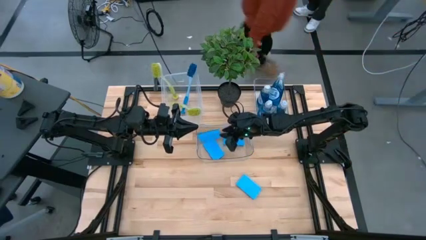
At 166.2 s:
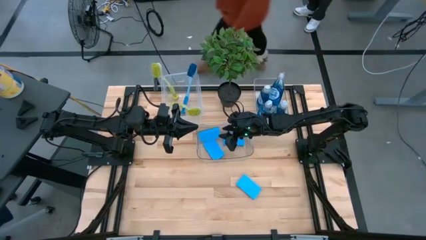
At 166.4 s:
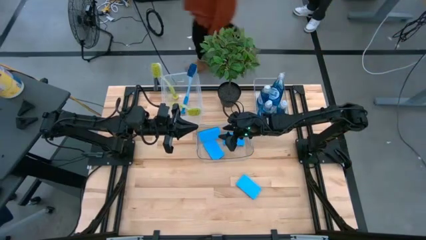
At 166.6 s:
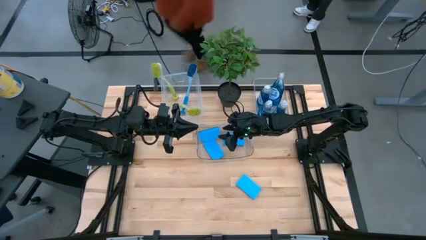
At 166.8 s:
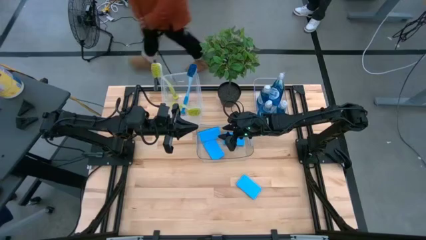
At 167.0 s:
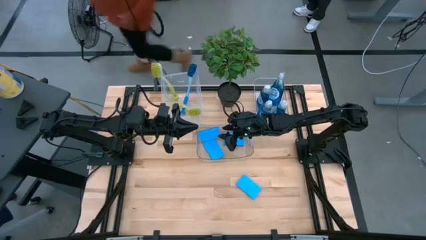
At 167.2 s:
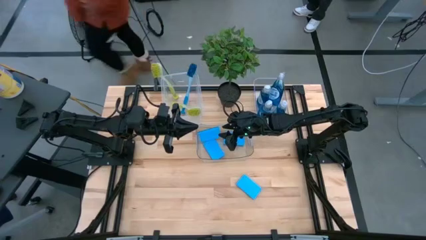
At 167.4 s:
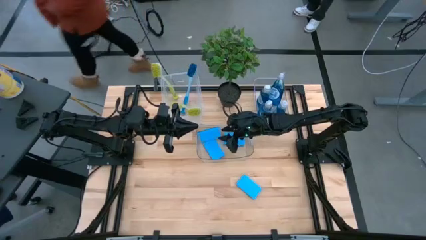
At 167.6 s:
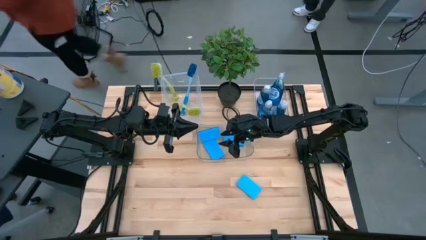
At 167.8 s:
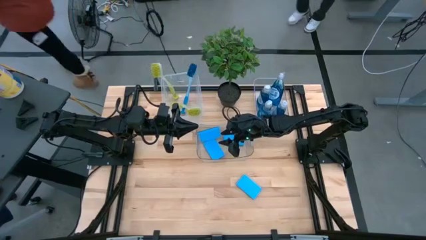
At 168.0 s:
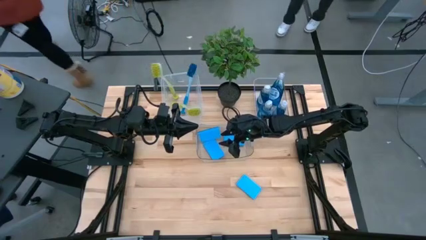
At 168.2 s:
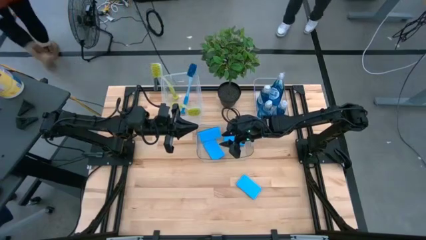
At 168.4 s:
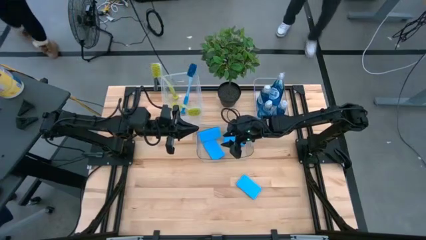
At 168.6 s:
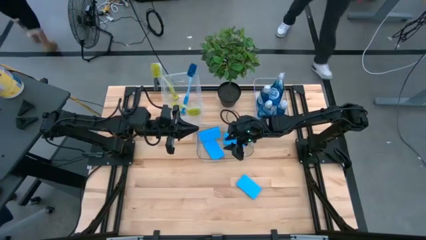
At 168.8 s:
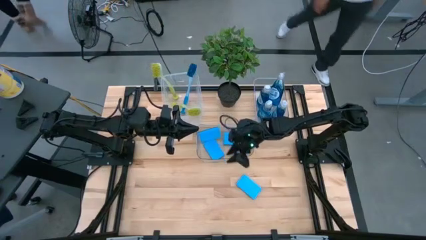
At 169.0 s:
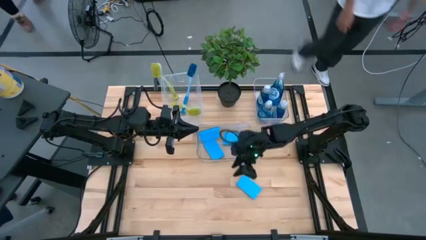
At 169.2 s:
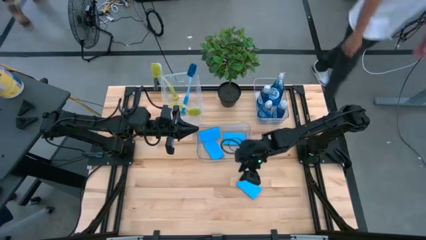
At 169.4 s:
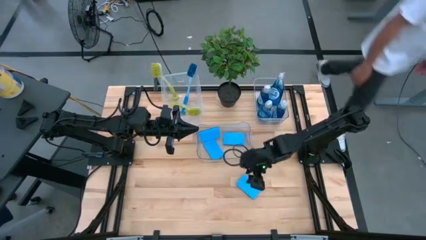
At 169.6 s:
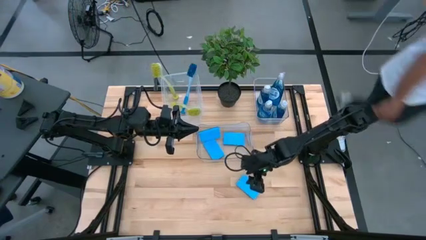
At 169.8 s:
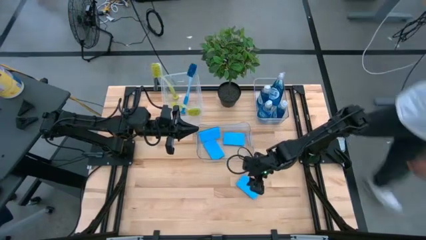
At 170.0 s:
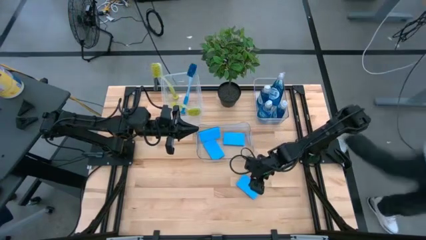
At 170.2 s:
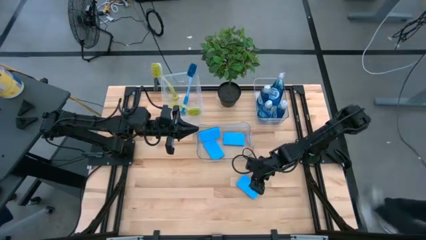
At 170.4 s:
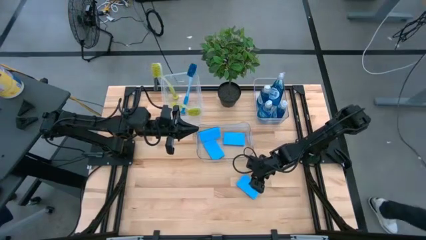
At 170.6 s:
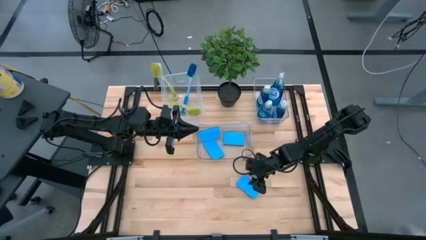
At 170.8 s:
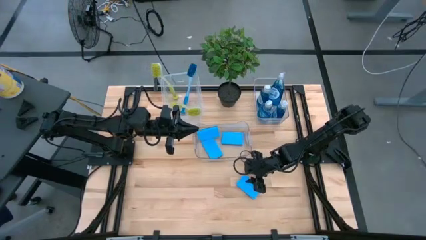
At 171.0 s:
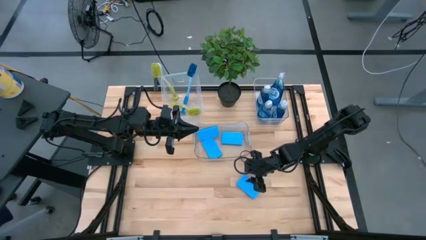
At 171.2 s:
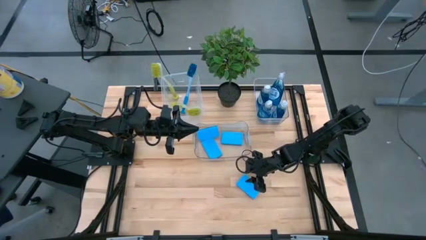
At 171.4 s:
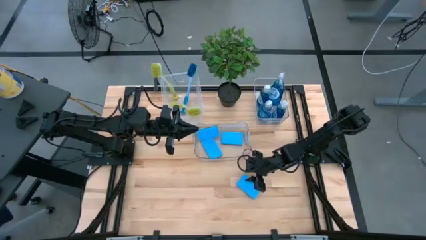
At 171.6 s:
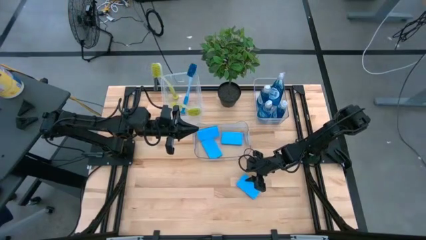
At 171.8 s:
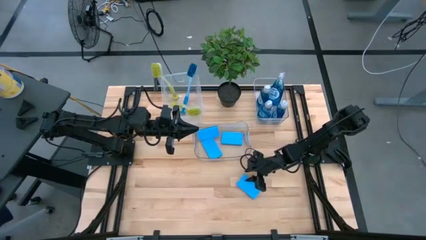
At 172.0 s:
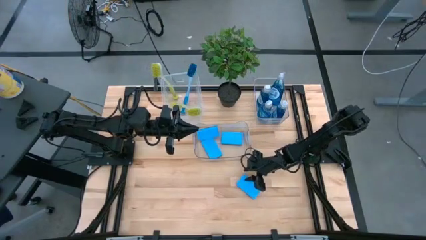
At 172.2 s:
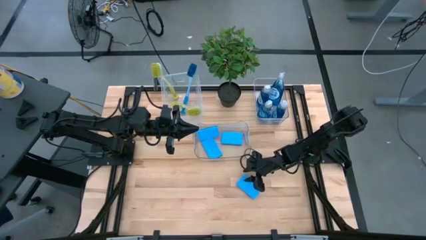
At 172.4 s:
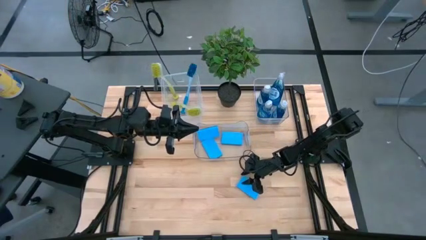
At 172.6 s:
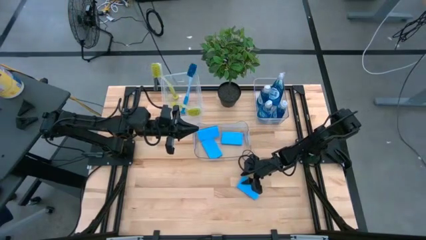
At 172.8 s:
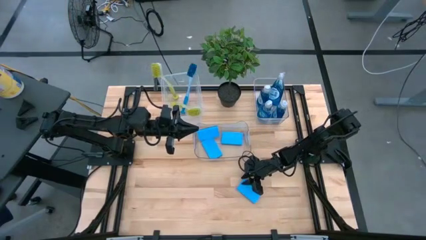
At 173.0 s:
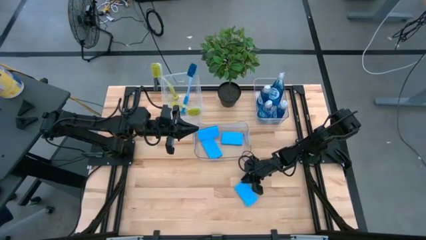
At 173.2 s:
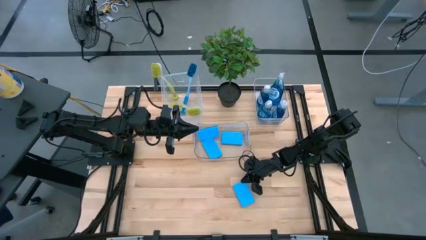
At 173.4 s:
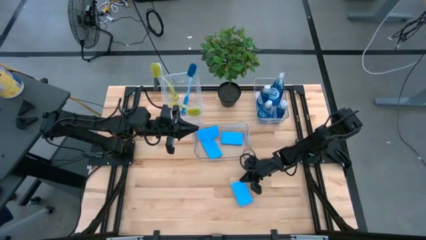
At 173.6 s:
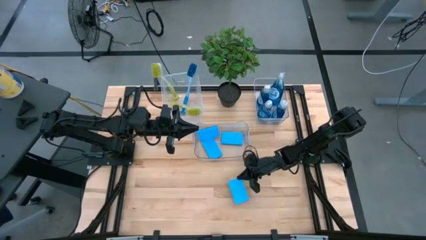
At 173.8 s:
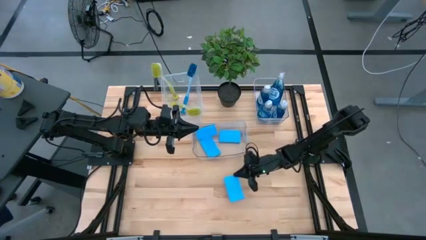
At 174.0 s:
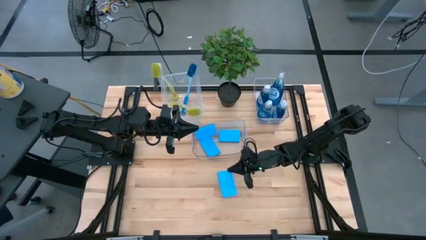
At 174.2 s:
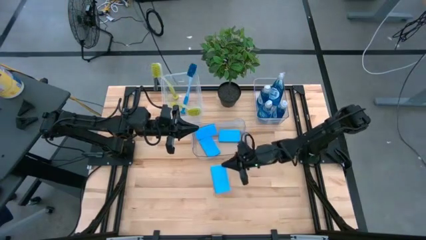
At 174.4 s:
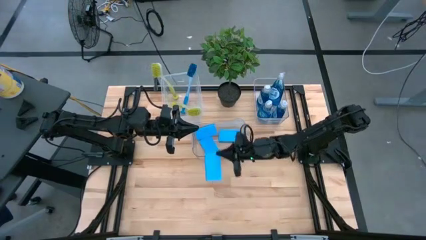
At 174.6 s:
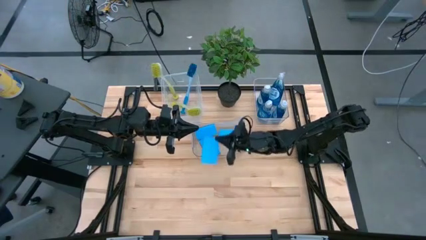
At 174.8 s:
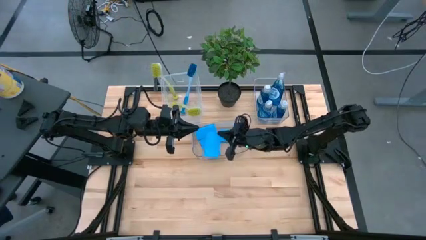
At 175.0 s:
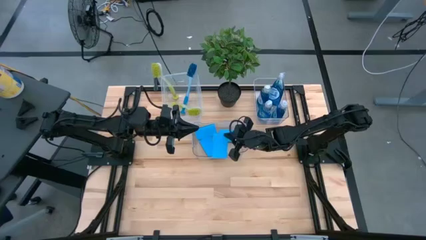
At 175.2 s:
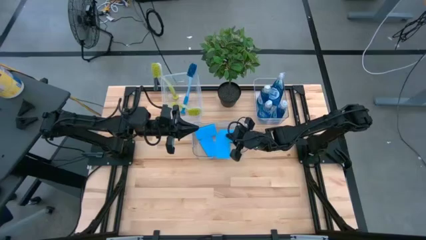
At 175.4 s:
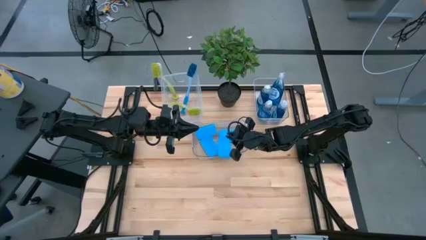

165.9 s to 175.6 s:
Task: Pick & Place Kitchen Sink Supplies
Put the blue sponge into the bottom transparent bin

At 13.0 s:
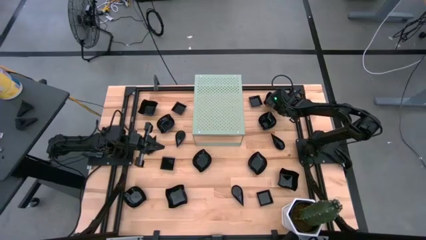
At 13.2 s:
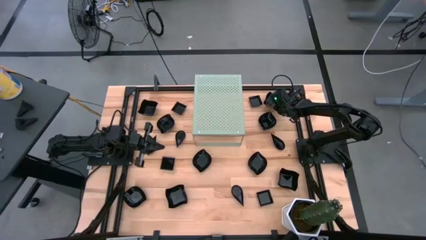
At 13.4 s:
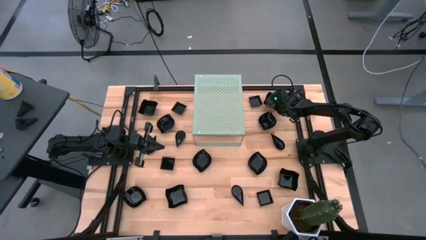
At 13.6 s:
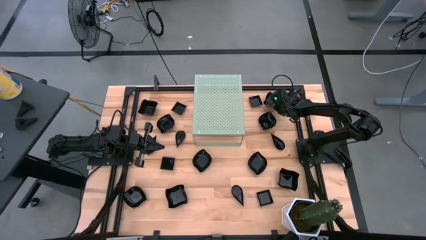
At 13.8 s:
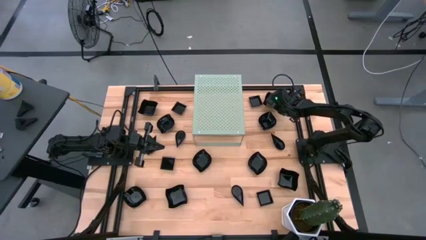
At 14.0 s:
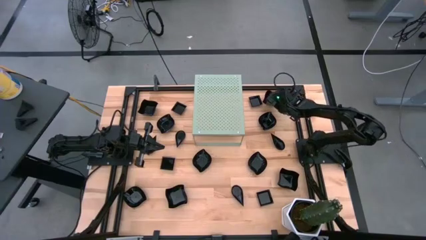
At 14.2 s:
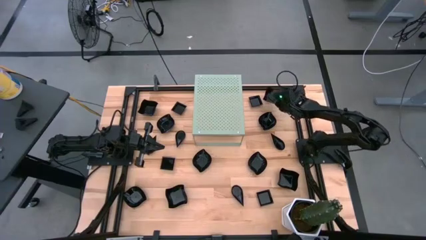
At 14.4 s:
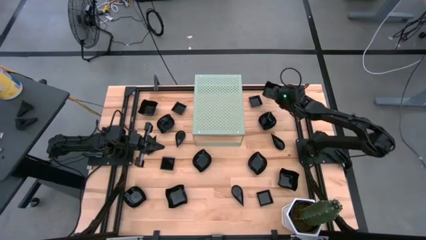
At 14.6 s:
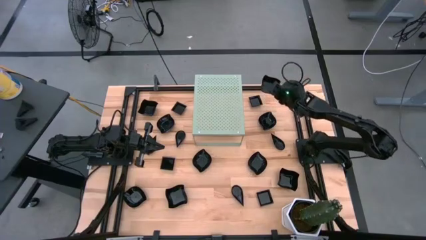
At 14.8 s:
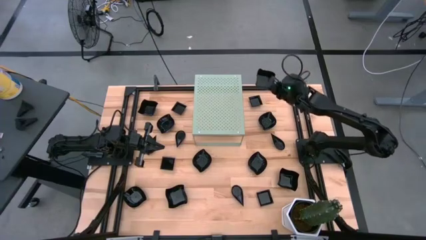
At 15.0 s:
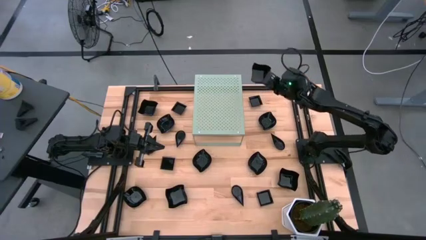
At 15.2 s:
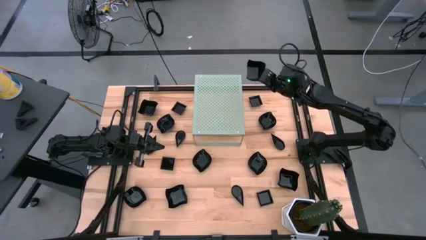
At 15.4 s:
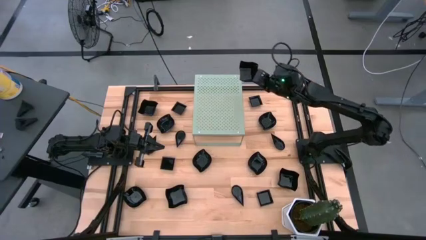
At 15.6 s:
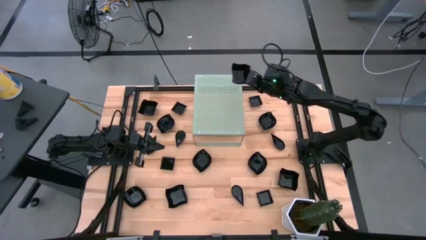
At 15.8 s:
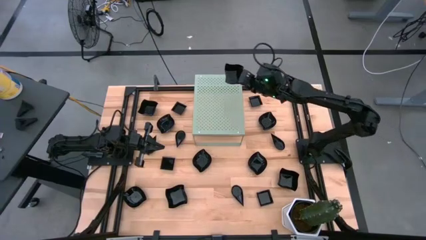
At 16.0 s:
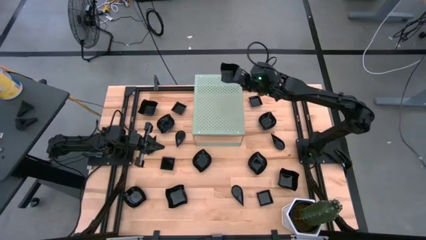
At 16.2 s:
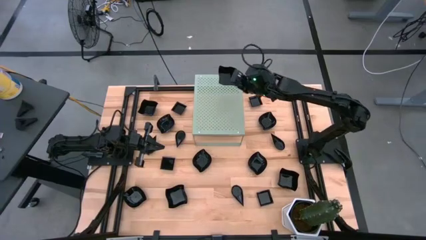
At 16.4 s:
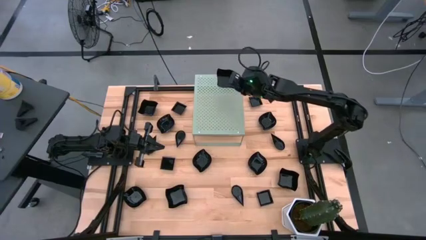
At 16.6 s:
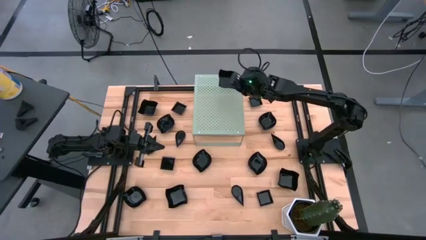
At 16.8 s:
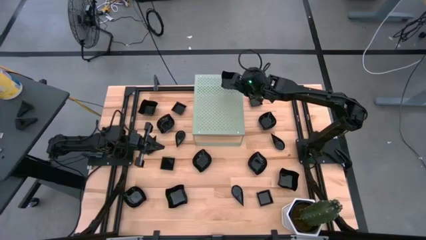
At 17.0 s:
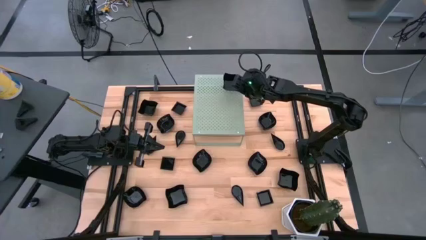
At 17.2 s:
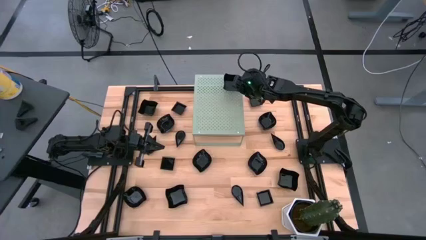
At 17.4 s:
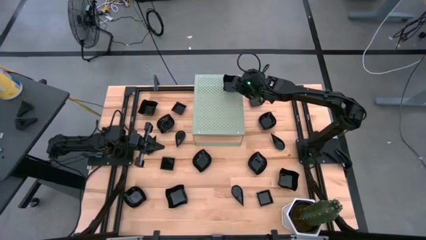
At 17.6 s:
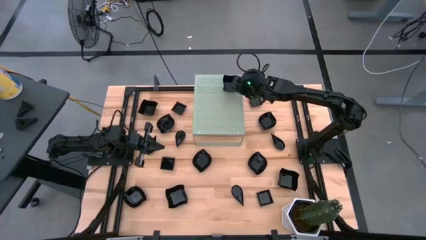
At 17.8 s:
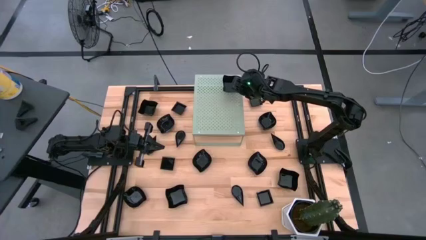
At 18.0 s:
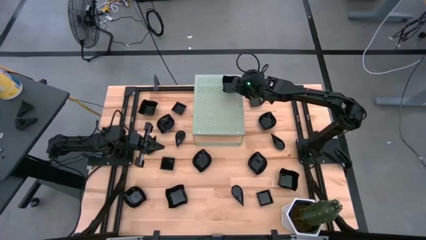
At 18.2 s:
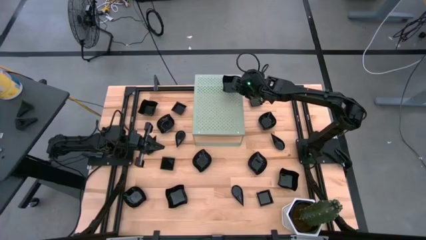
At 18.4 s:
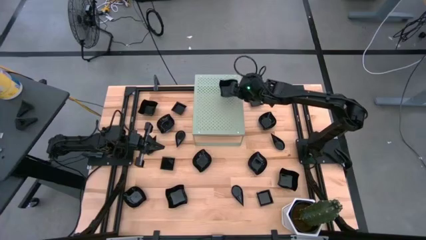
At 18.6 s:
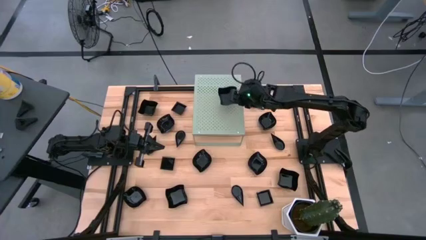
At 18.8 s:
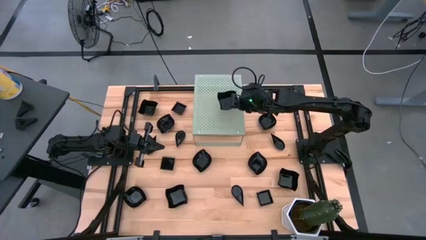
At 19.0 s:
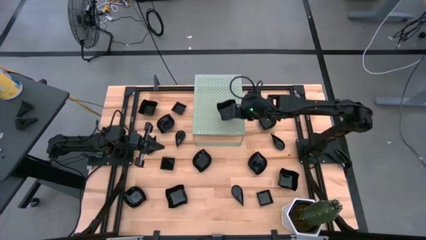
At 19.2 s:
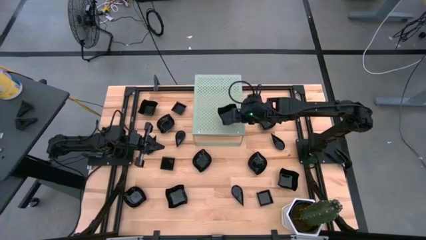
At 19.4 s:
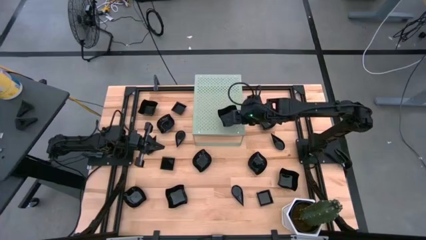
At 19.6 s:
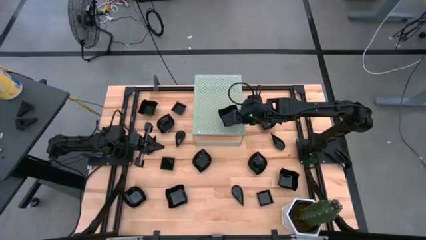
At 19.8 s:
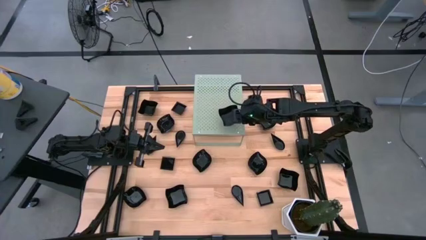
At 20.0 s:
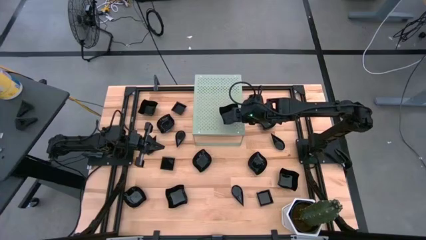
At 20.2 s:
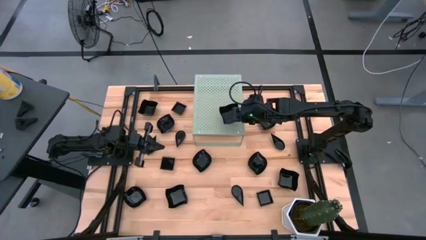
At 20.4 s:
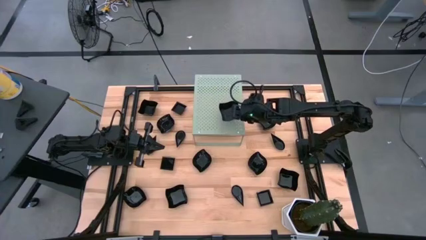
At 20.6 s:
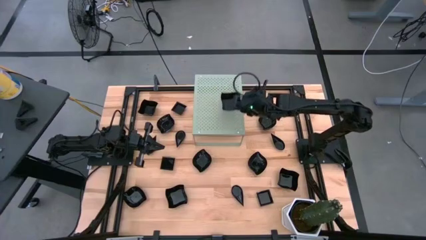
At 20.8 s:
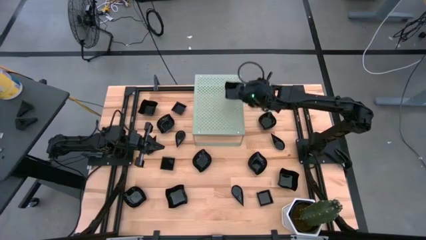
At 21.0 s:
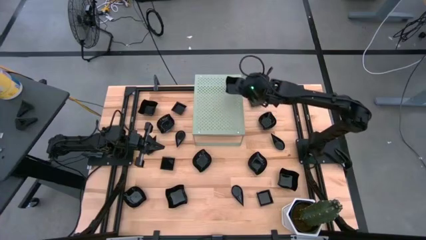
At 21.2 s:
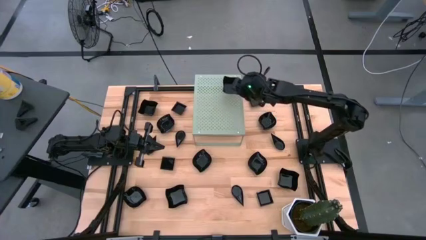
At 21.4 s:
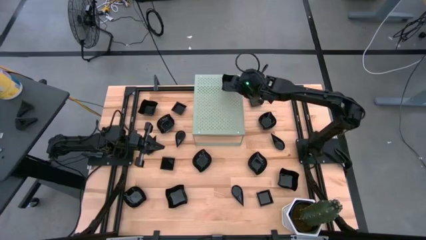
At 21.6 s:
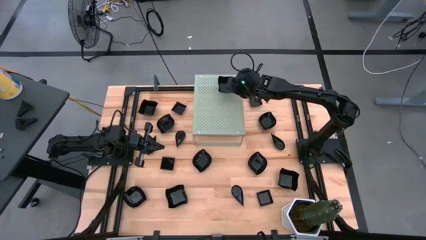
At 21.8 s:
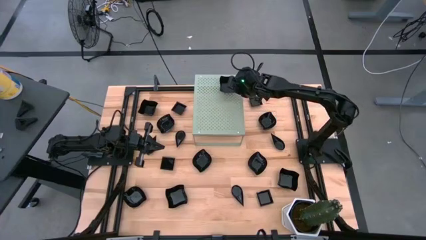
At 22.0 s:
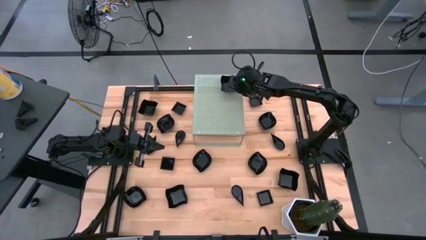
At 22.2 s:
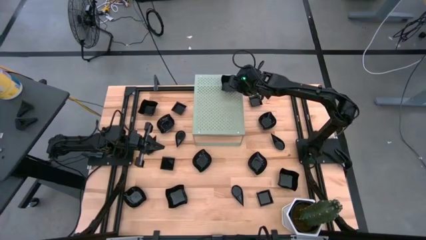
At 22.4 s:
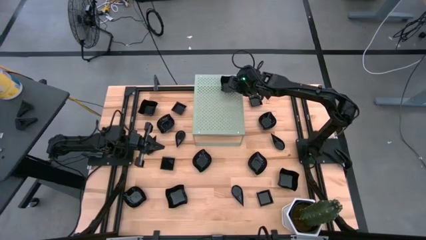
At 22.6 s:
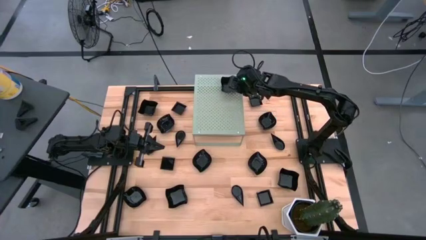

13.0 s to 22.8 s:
Task: Pick & Place Mini shaped plates
Put the distorted square plate on the shelf
